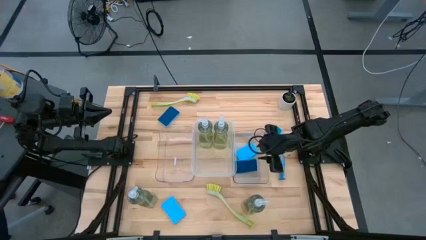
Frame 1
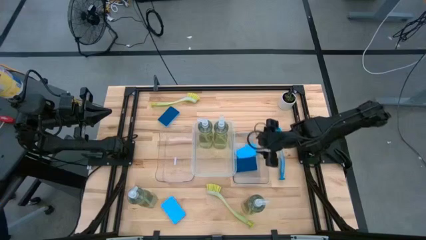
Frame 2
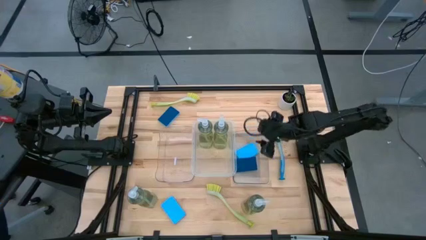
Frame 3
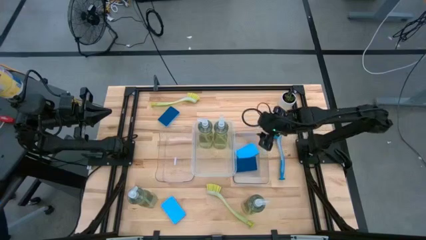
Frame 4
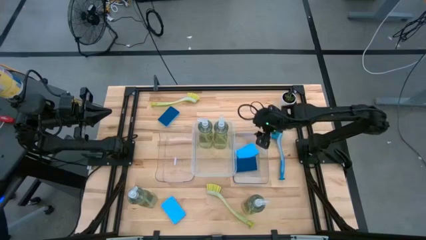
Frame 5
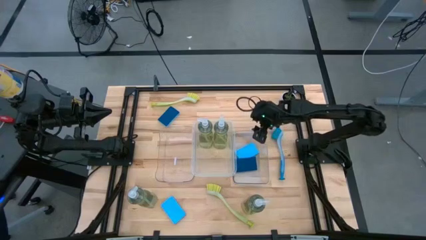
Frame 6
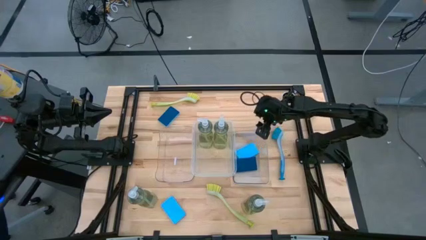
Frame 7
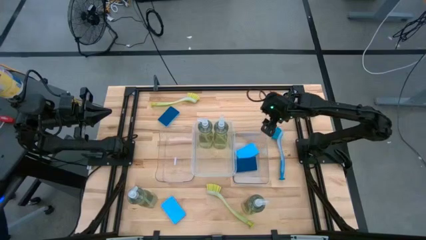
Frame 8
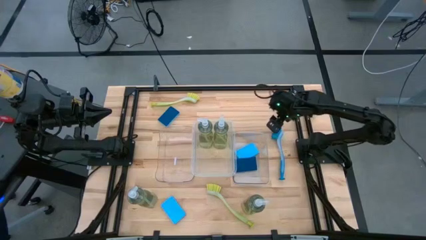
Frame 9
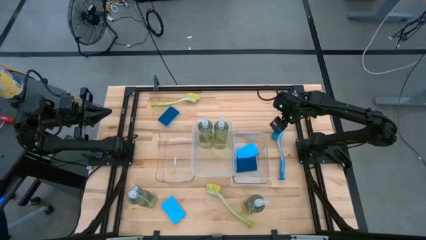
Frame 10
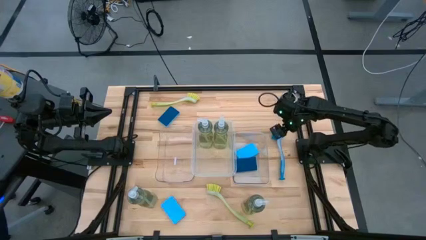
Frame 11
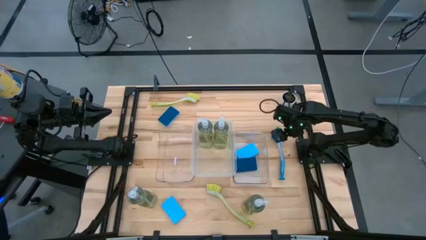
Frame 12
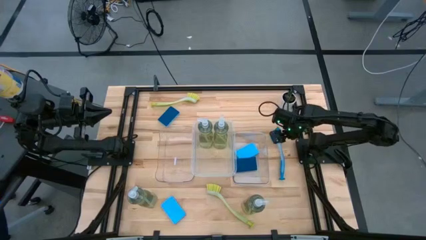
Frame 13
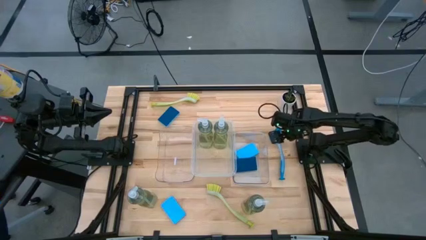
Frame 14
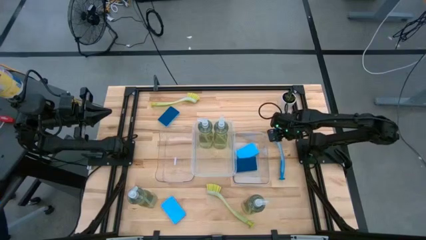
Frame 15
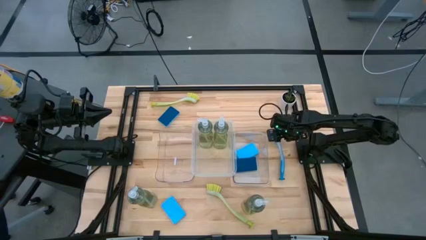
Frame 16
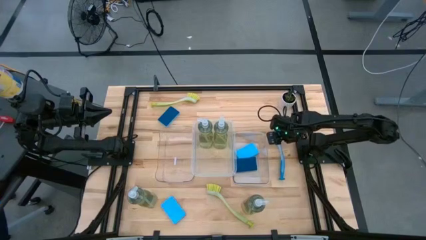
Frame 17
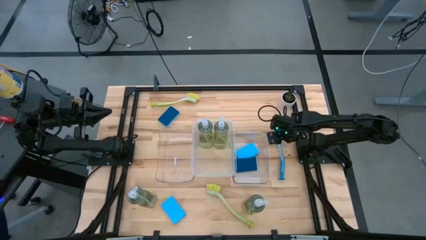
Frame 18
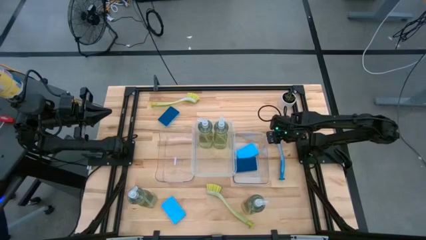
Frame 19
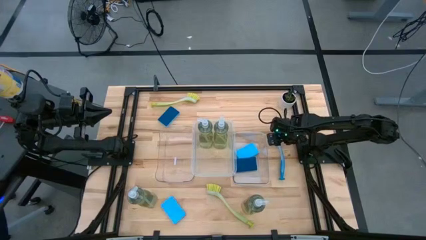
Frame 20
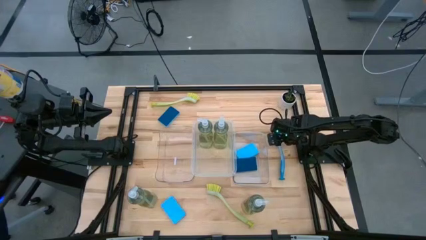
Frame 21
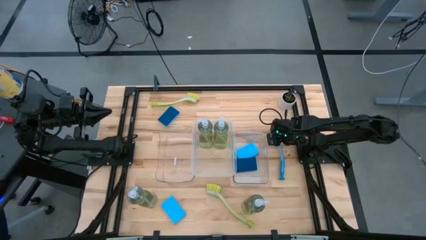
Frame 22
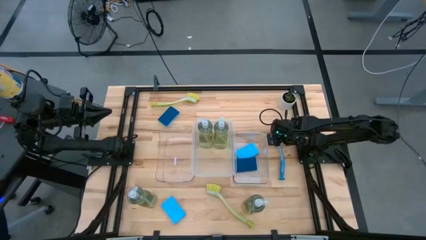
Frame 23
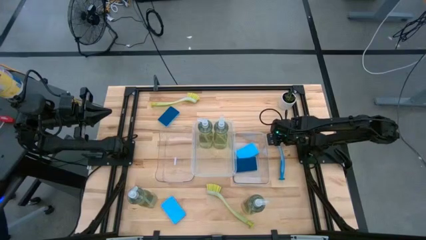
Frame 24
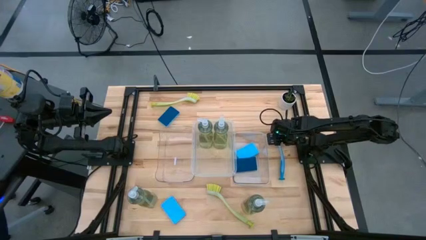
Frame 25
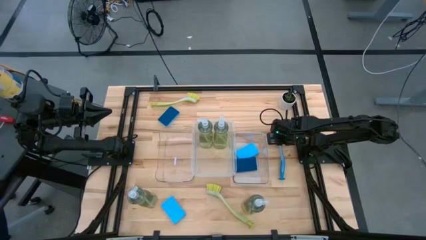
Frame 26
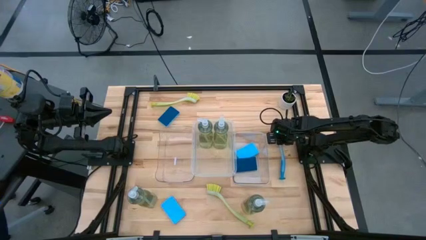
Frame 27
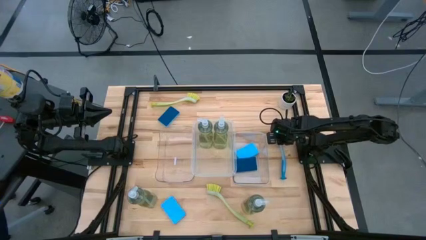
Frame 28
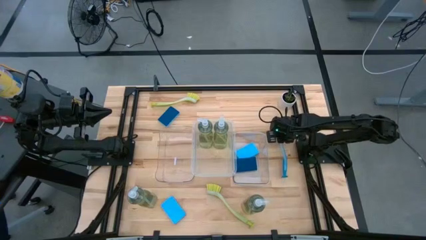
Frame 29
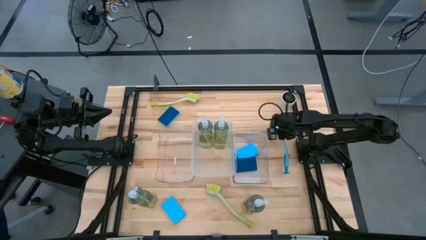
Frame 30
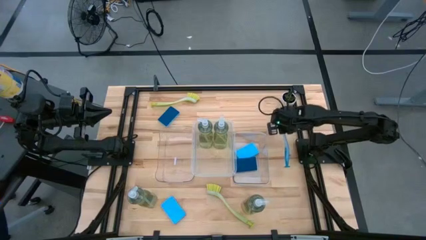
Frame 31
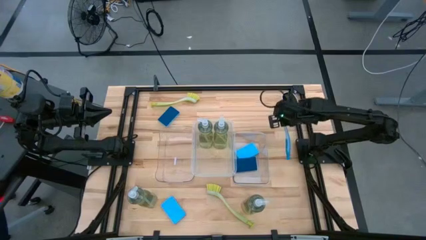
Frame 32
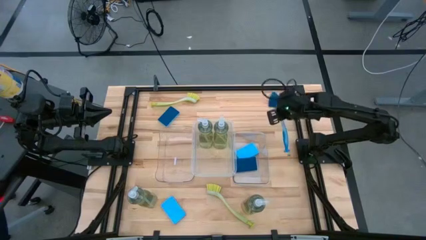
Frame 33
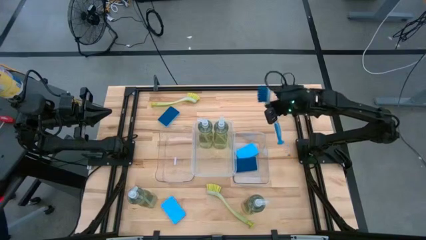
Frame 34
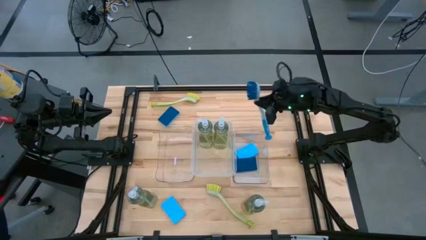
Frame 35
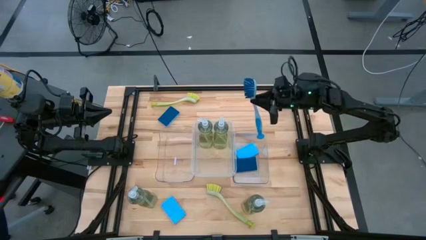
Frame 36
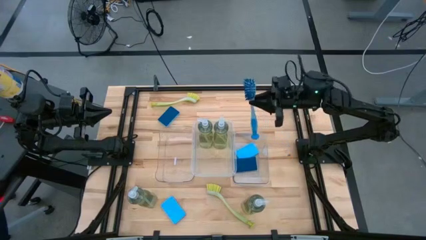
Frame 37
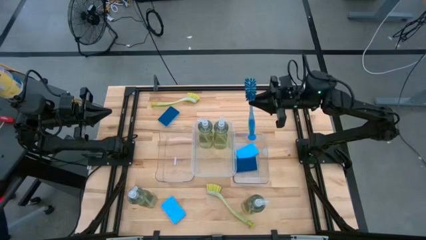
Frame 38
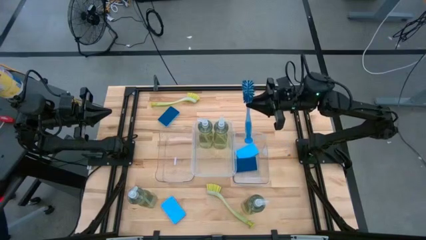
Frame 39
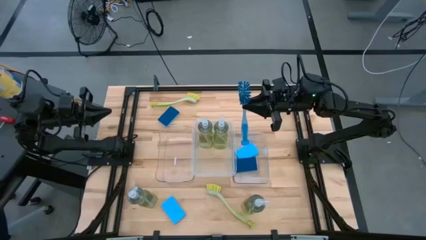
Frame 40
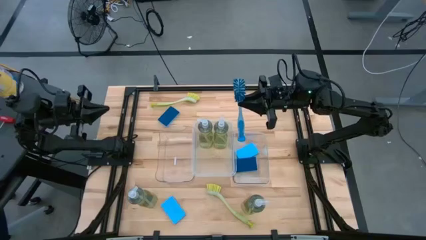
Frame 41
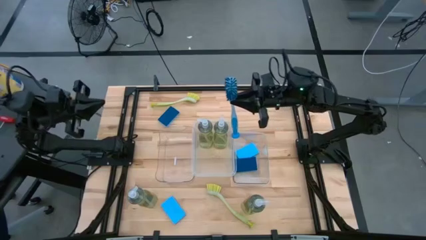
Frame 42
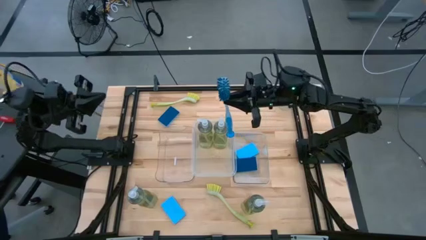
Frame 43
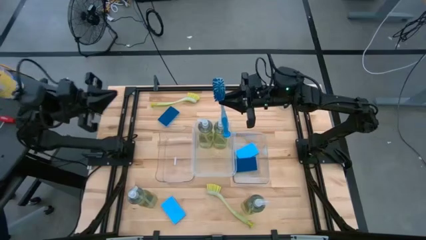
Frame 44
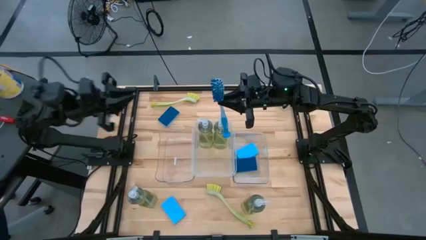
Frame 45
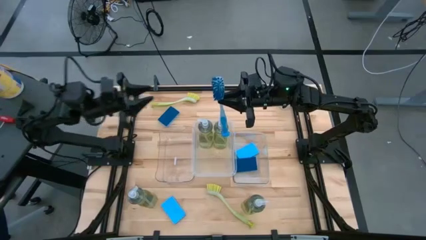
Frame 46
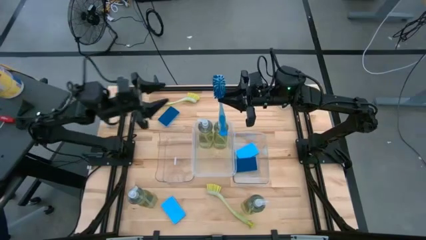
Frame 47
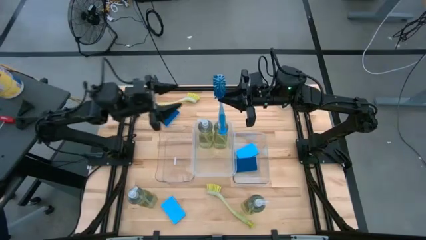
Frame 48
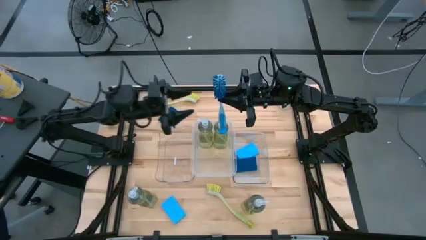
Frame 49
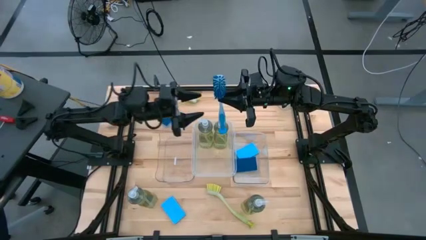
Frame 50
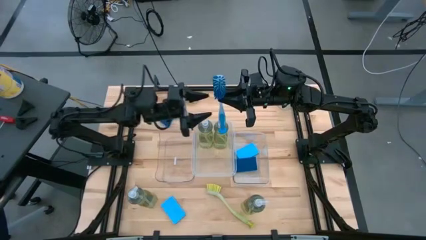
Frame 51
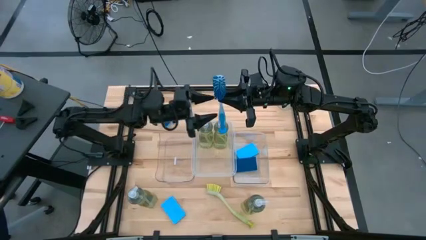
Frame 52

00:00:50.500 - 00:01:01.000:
Task: Pick & Place Kitchen Sink Supplies
Put the blue dishwashing brush into the left transparent bin

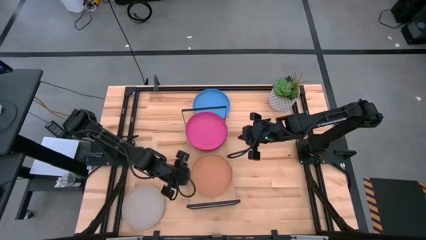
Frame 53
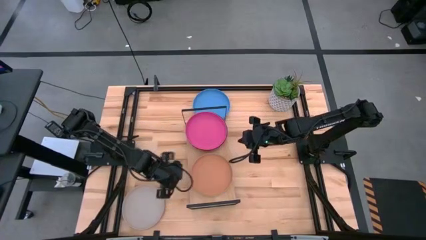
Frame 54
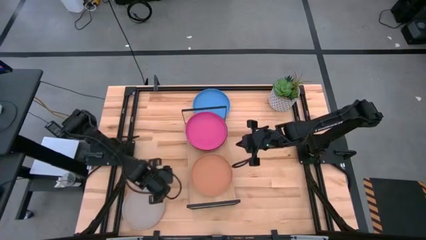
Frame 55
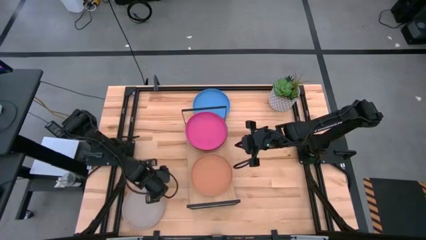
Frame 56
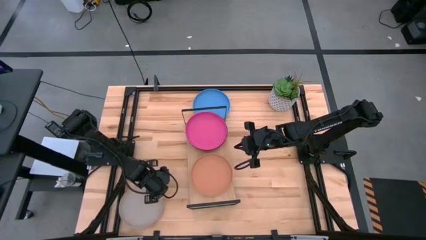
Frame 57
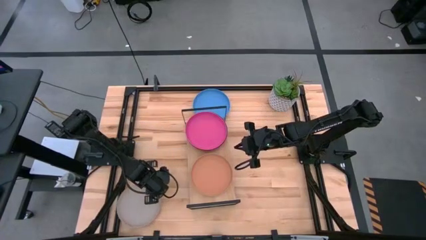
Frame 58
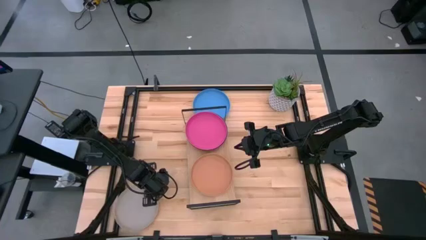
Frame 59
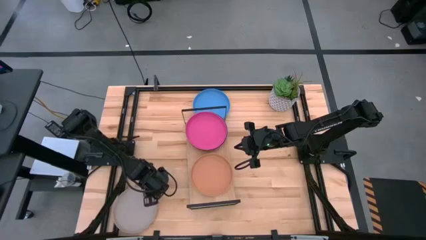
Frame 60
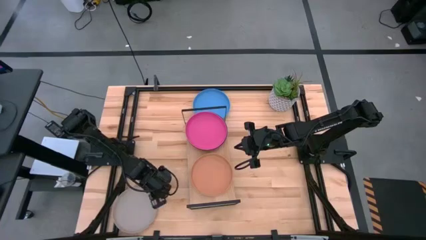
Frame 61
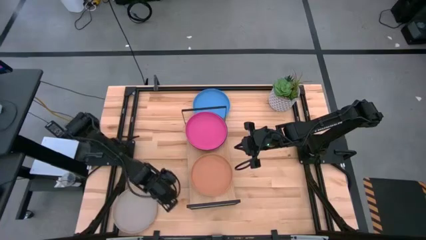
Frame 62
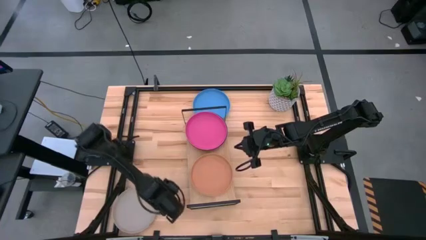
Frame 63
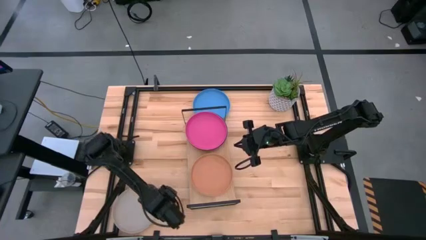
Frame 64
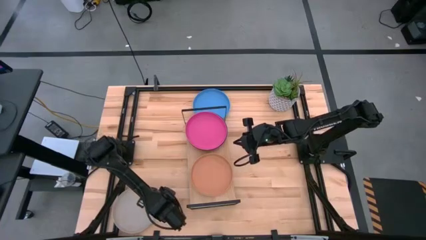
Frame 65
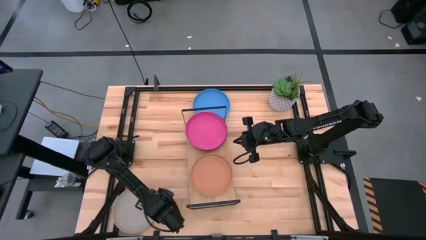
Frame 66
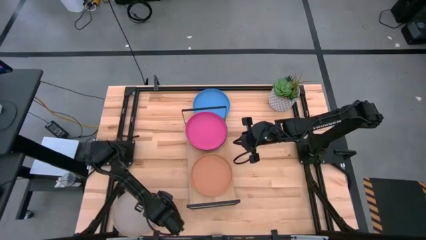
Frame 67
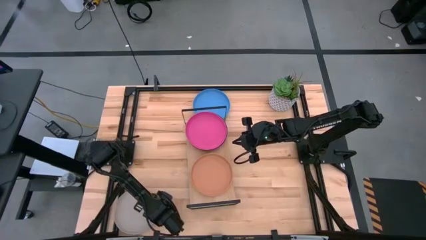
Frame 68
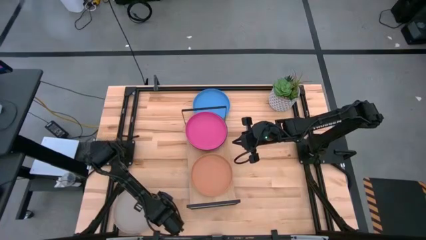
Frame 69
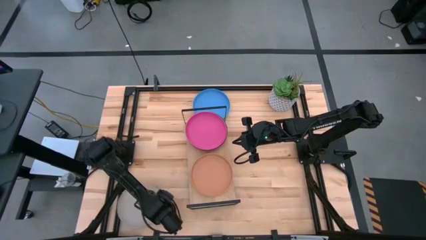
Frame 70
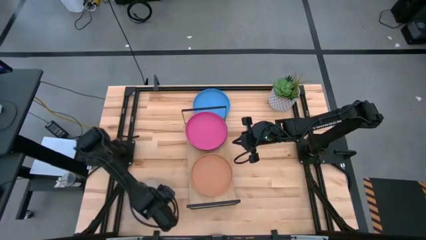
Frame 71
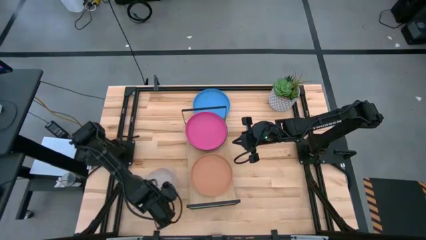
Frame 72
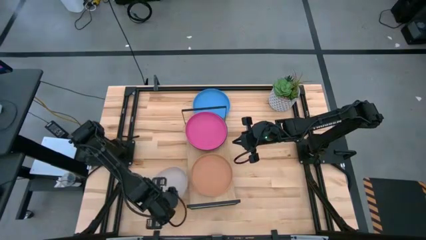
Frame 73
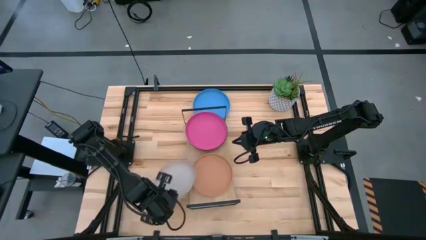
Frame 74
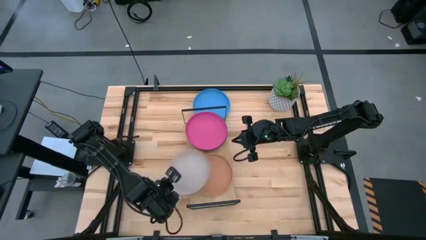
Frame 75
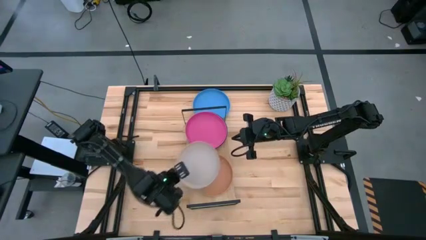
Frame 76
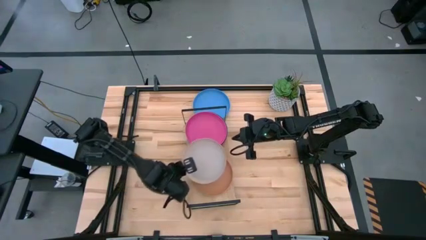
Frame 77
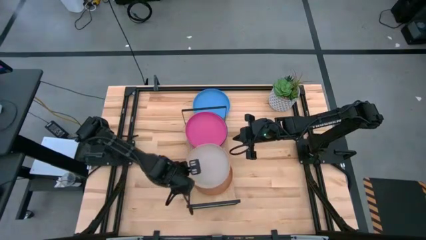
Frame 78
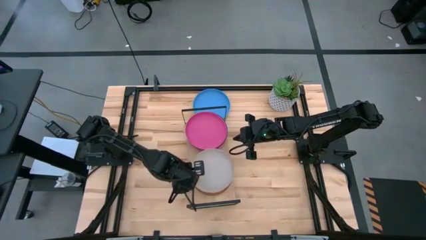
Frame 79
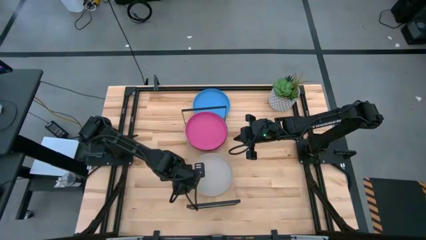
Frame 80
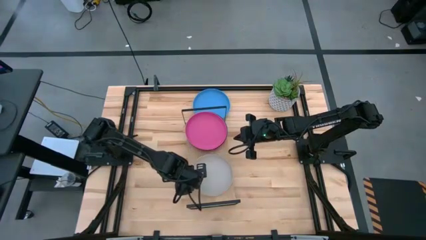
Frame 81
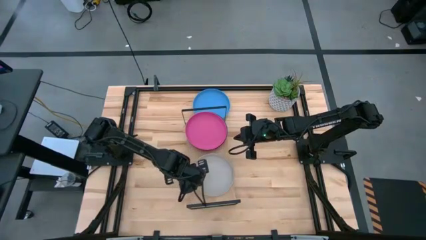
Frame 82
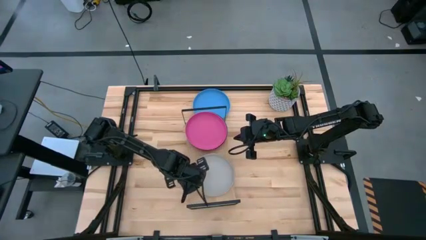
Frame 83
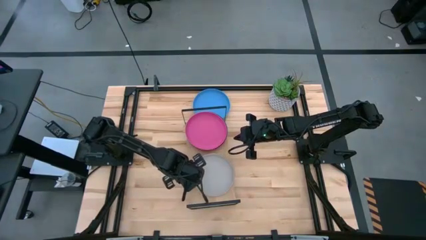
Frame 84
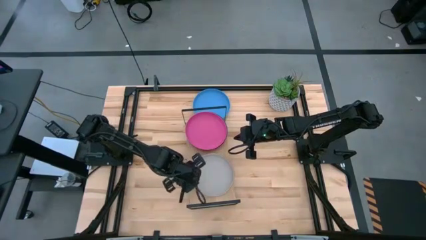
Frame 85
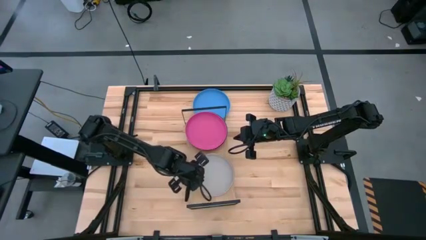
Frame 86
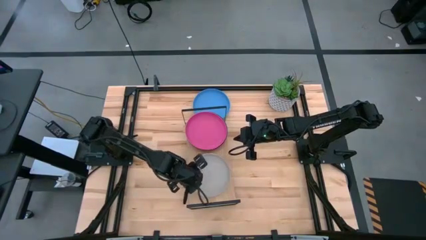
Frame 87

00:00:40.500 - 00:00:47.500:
Task: Place and stack plates onto a shelf
Stack the gray plate on top of the brown plate on the shelf
